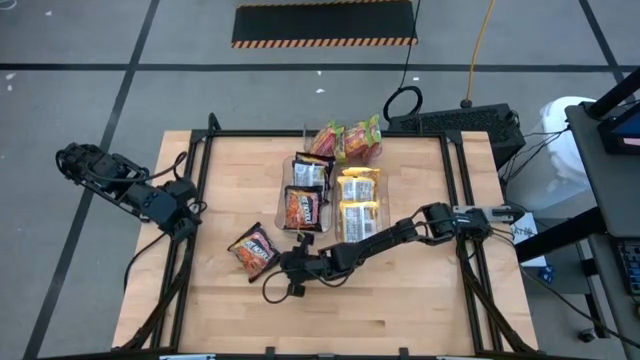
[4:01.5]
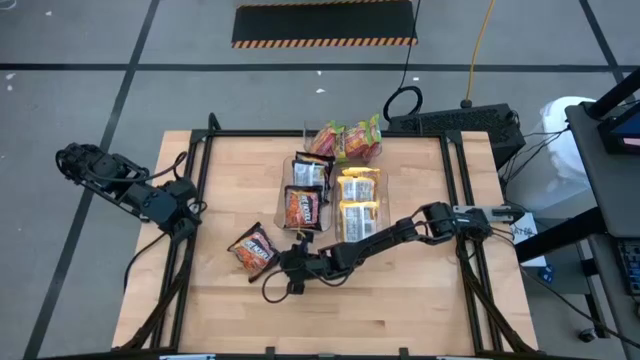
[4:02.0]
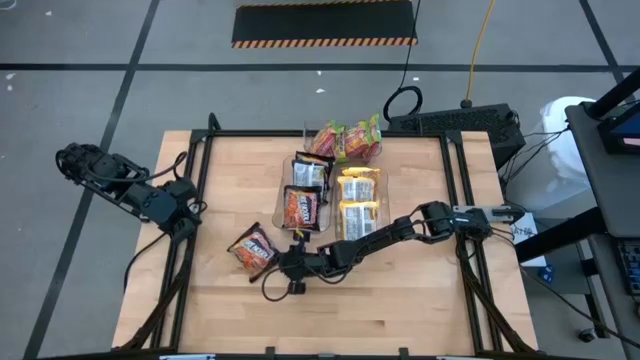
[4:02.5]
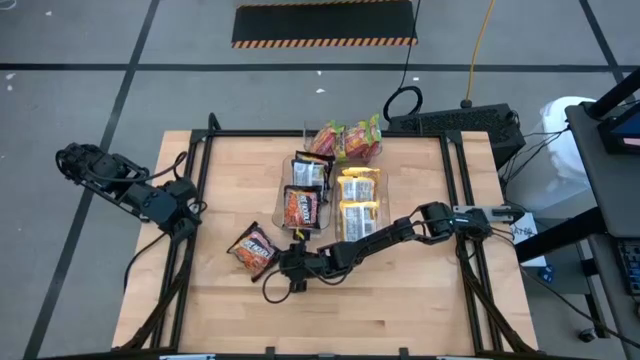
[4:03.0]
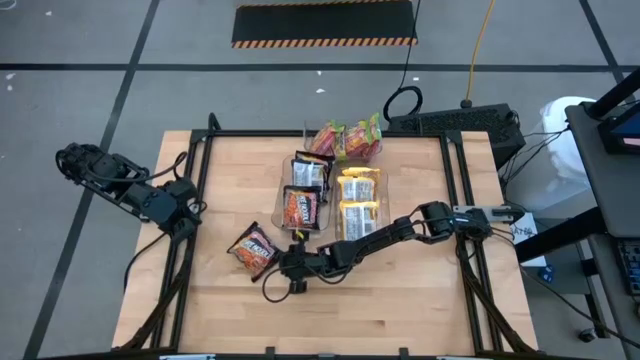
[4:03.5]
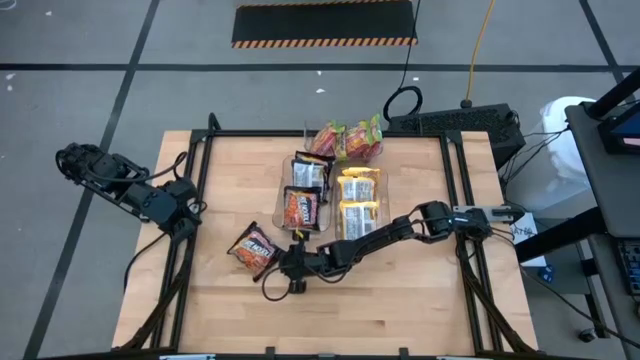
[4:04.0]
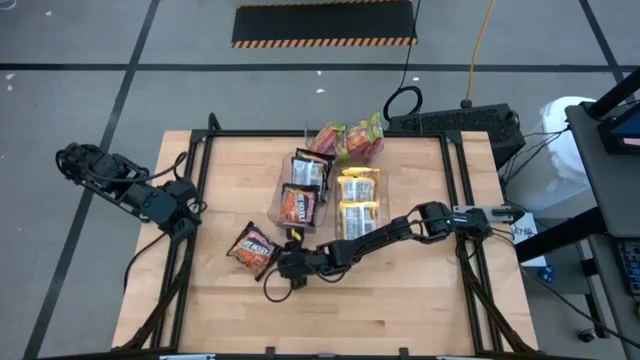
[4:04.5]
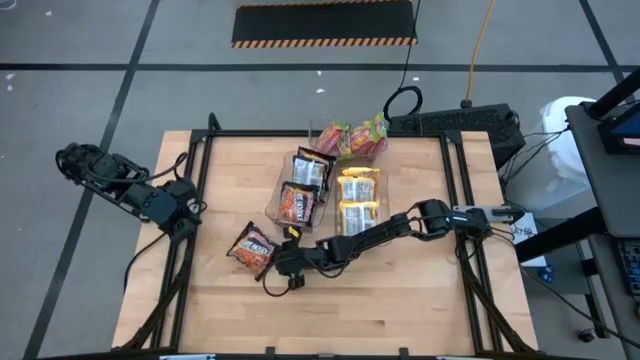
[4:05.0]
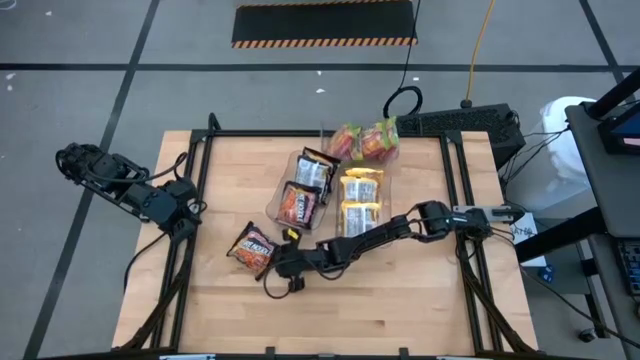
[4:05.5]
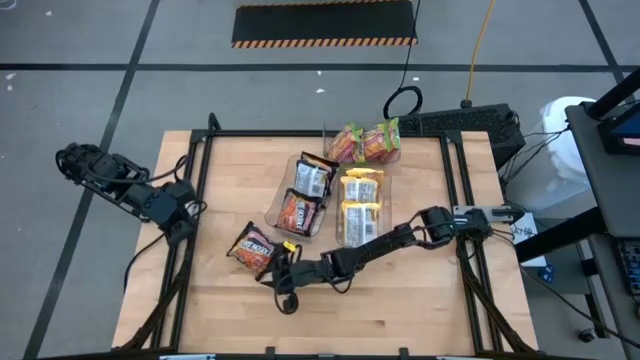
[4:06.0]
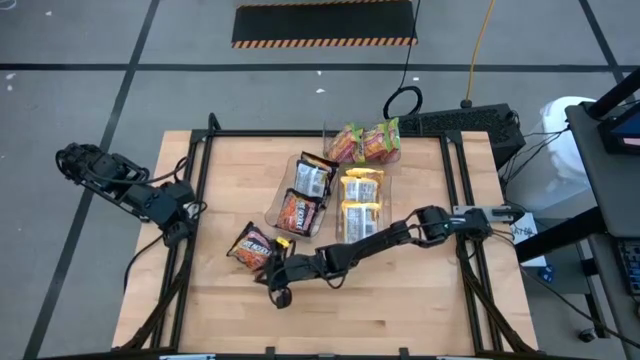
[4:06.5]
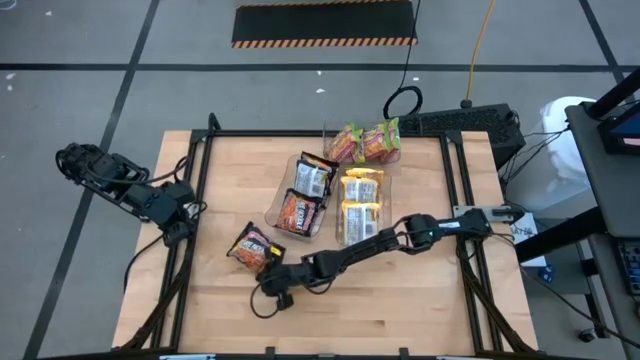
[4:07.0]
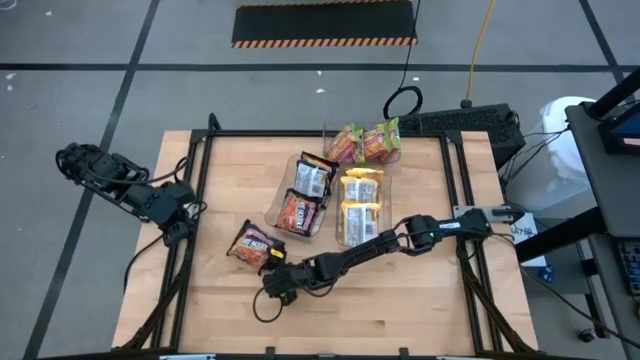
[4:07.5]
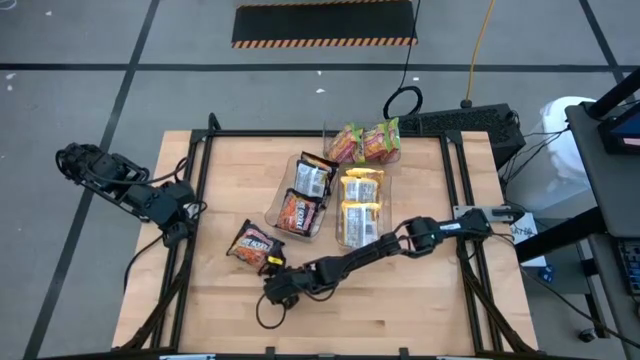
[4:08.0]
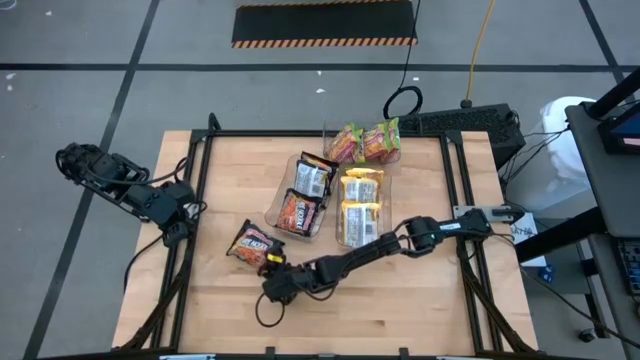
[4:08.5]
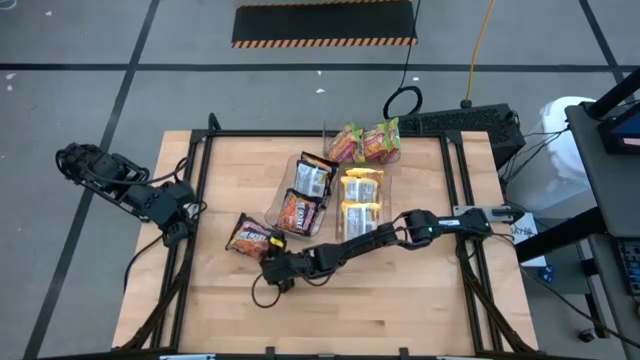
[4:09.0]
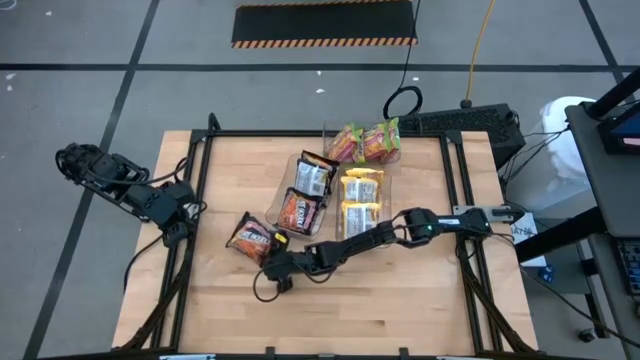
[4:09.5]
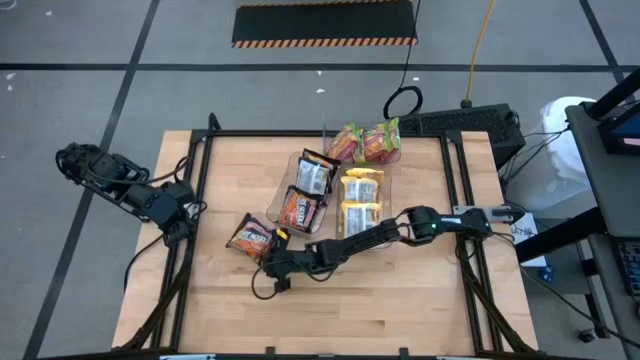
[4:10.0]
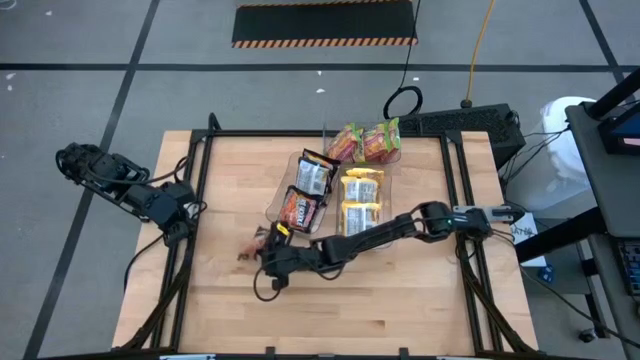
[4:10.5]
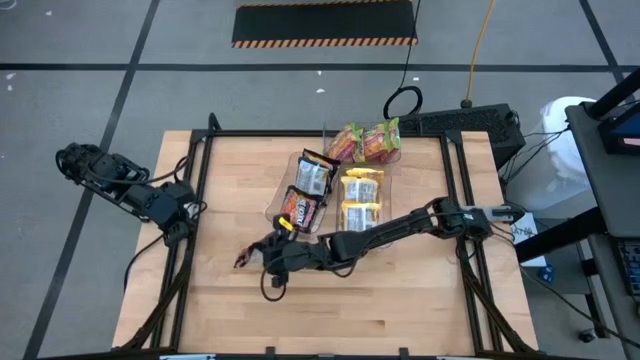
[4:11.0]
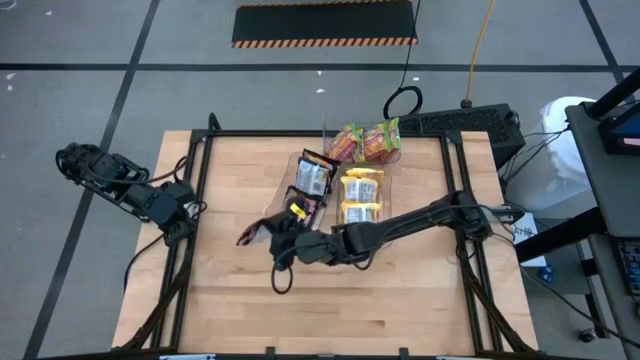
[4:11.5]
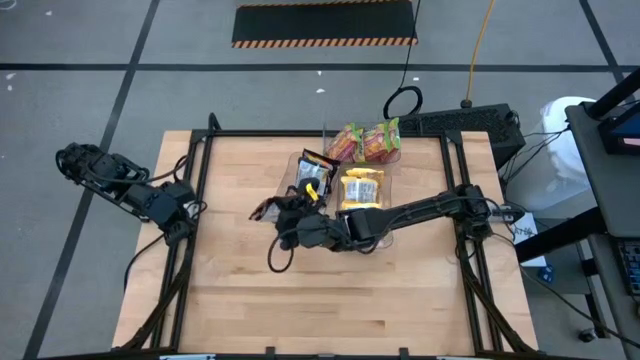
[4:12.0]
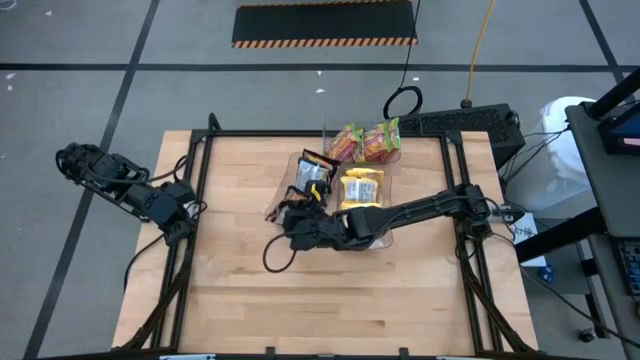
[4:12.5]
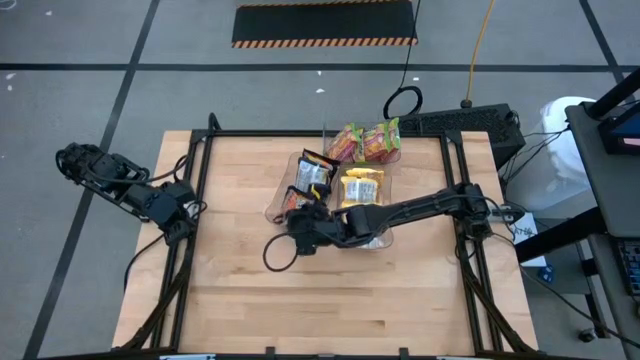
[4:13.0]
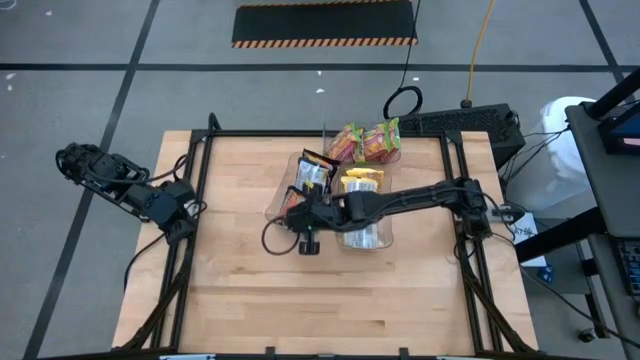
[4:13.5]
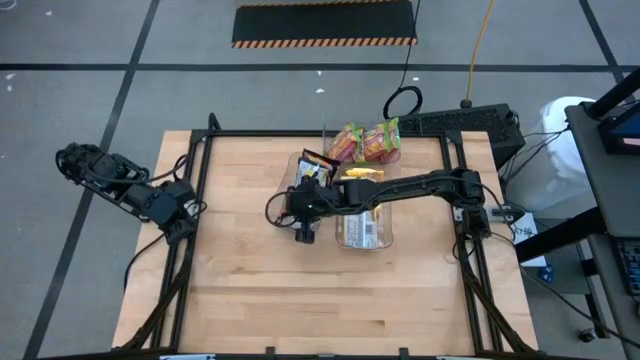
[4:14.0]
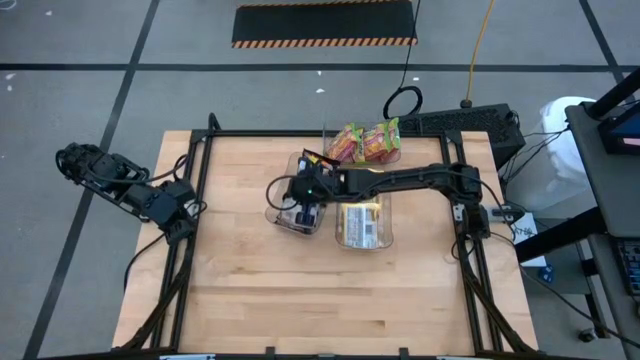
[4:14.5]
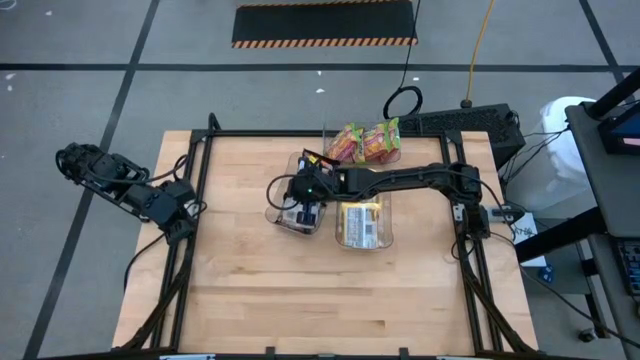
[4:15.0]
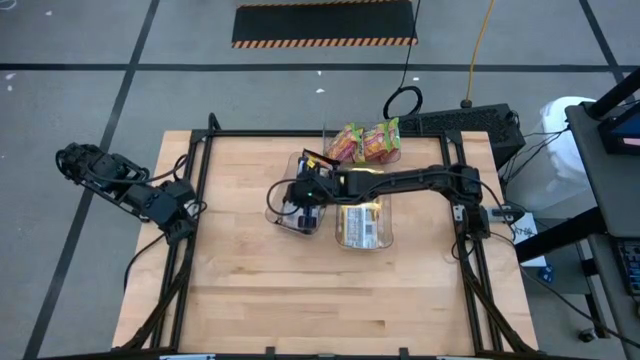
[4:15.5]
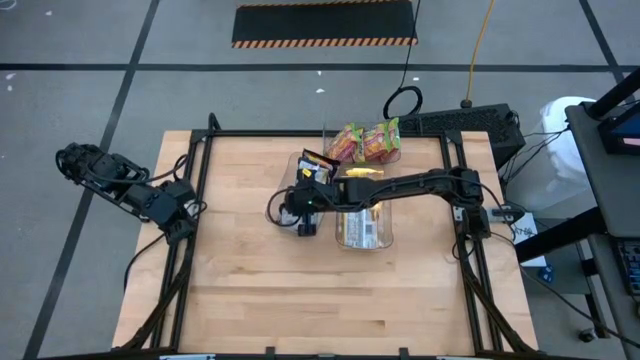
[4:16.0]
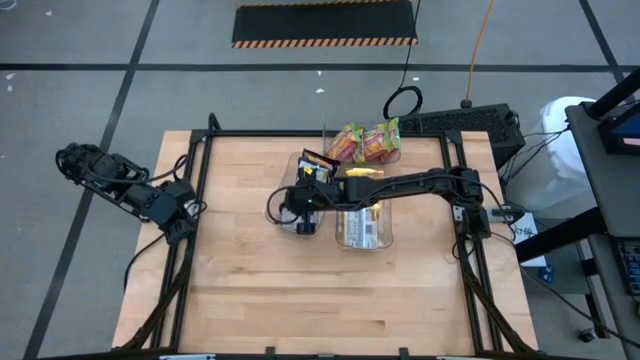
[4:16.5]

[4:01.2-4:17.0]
Task: Sort Maruchan noodles
Put the black noodle pack into the left transparent bin

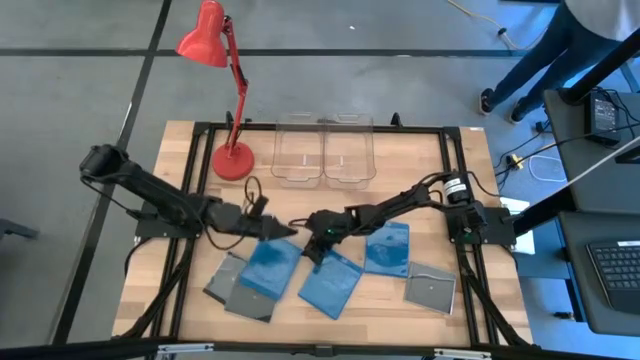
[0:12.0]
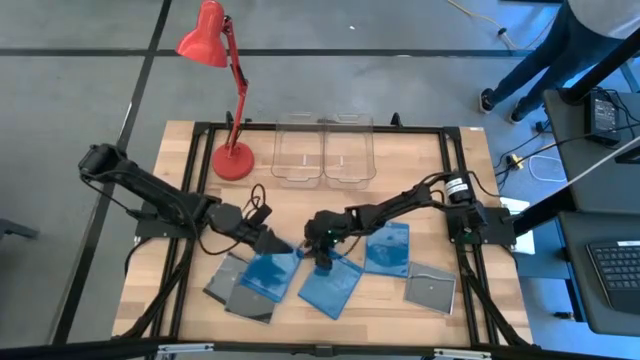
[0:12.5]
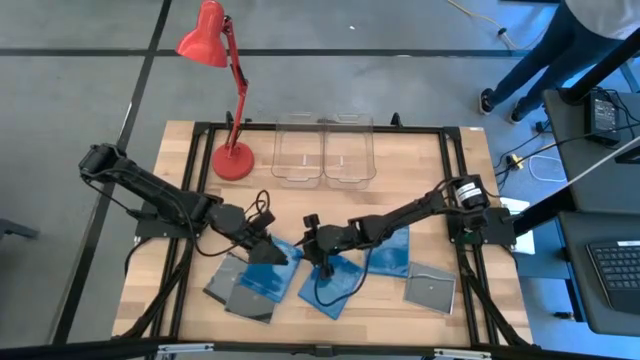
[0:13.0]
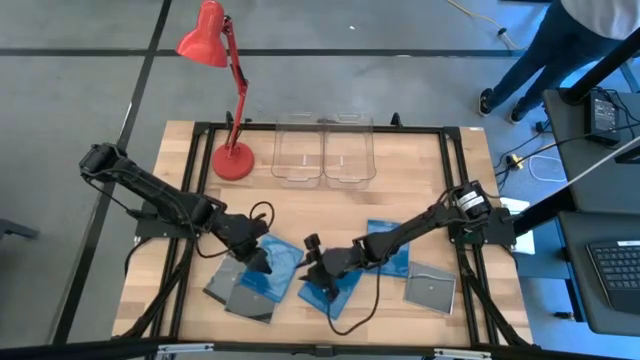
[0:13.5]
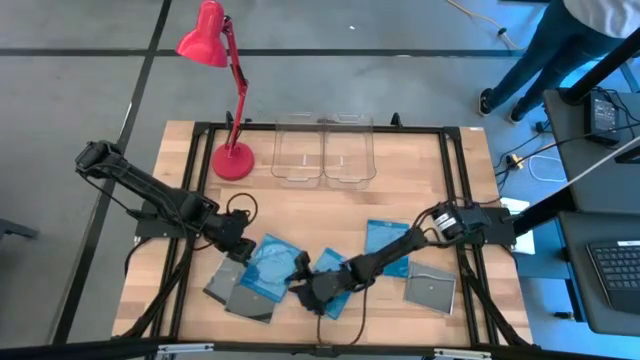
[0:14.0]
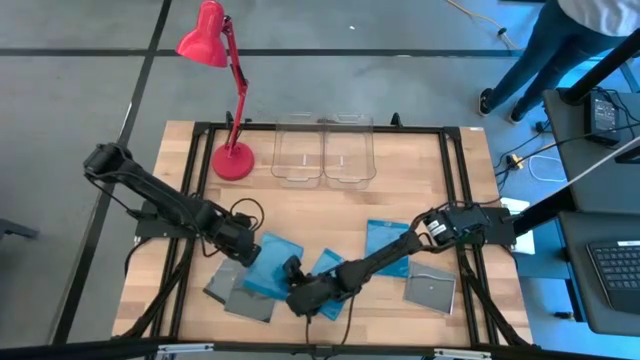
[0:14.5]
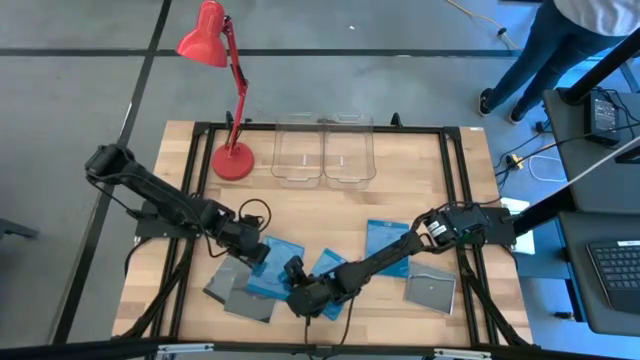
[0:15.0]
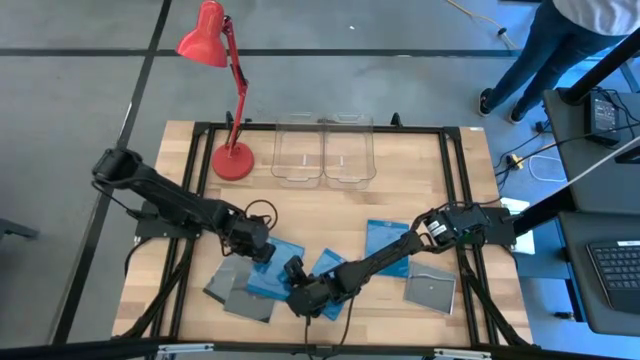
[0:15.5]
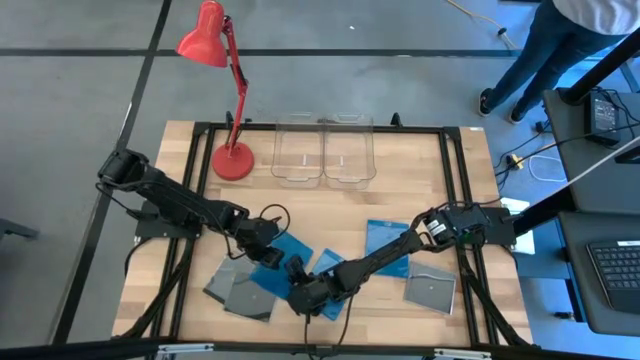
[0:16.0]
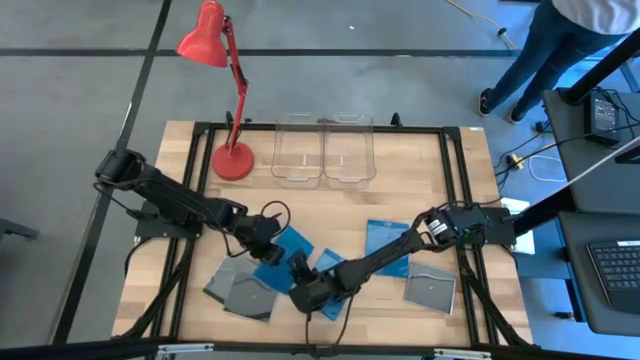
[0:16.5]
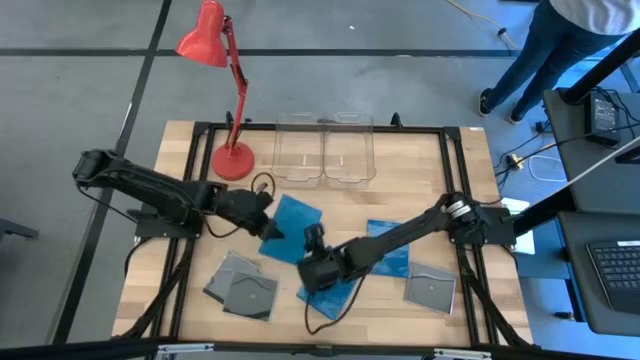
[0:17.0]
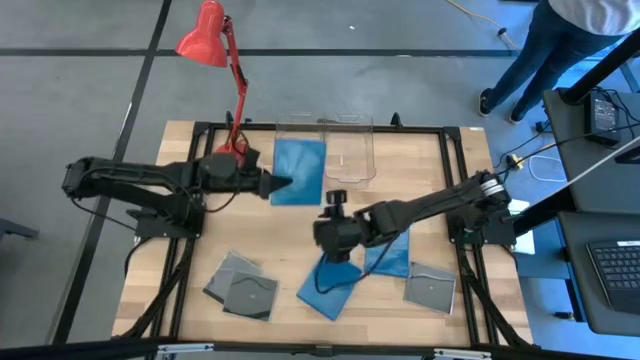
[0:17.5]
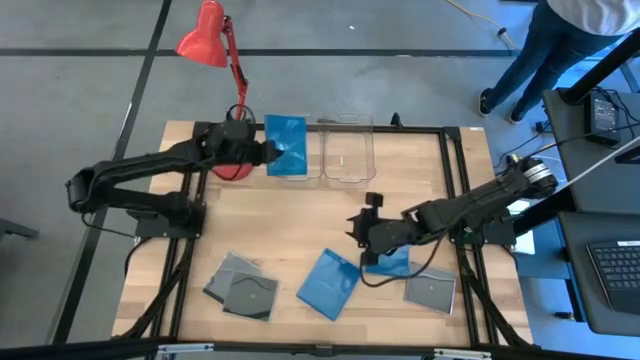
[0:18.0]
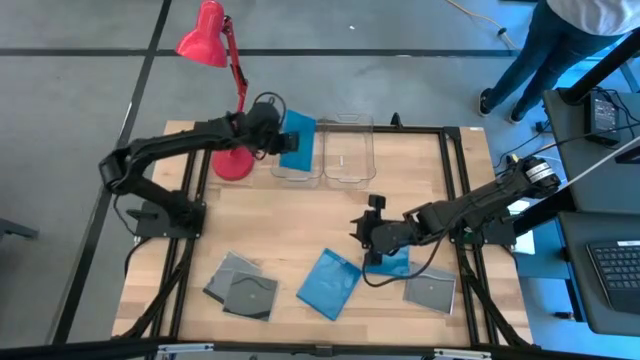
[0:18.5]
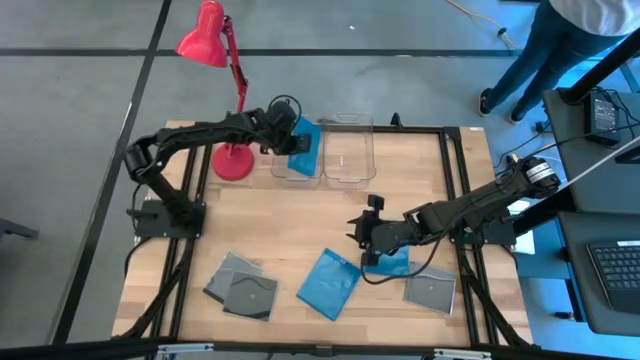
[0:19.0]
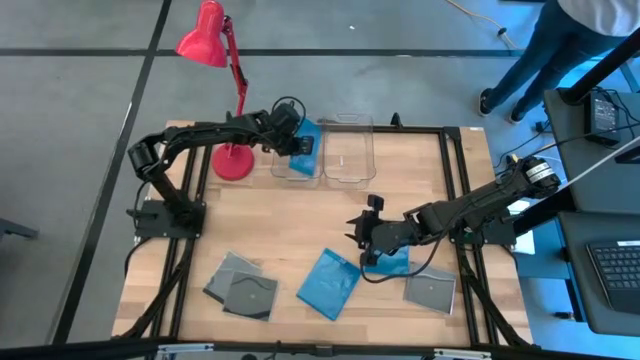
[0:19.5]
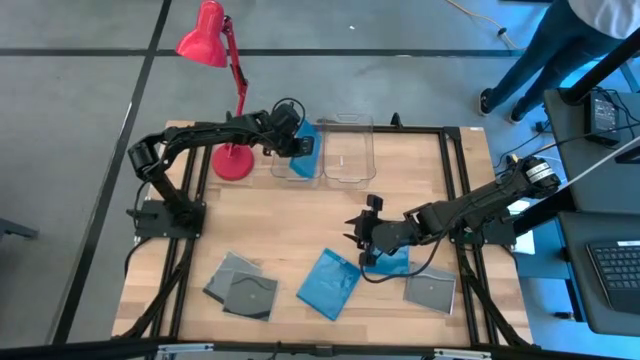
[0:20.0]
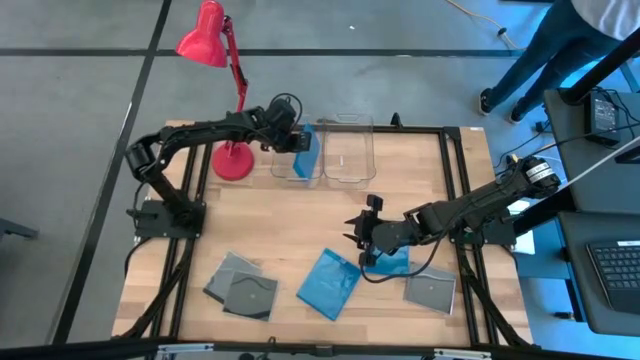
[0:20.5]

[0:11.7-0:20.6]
Task: Pick & place jewel cases by type
Put the left blue CD case into the left transparent bin
